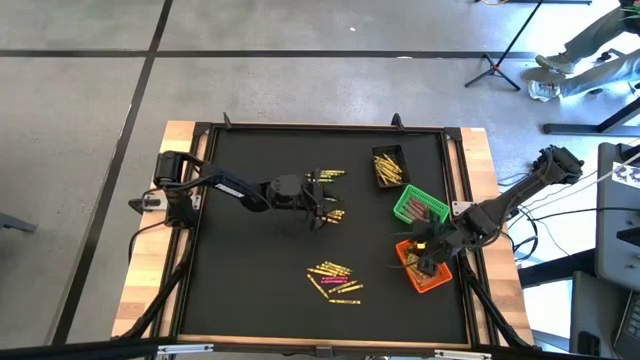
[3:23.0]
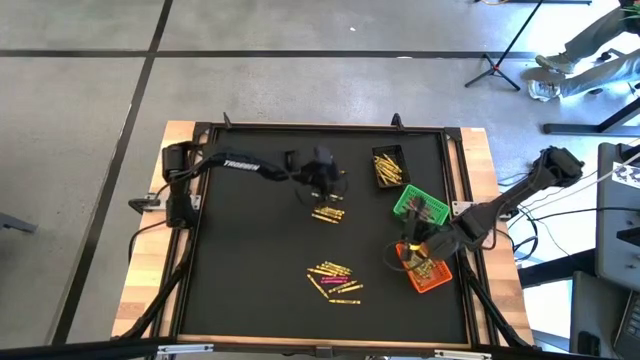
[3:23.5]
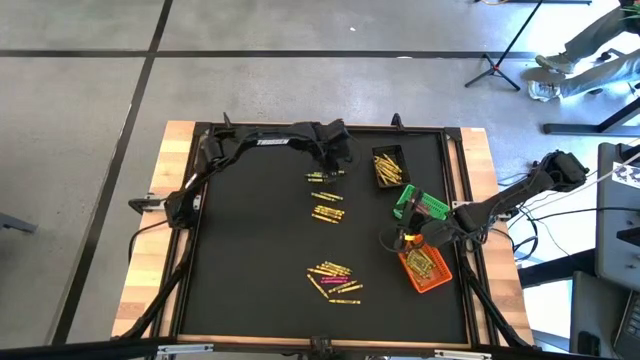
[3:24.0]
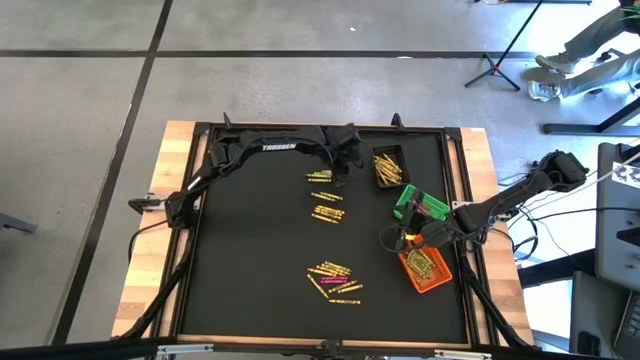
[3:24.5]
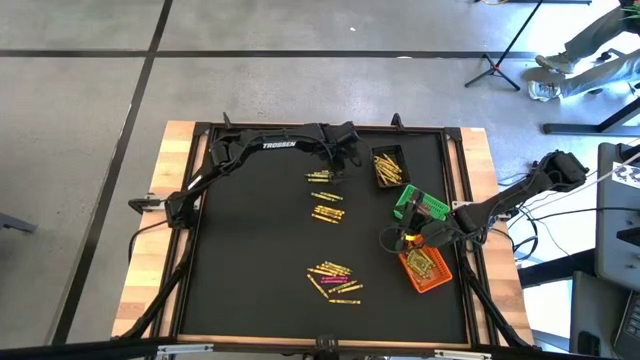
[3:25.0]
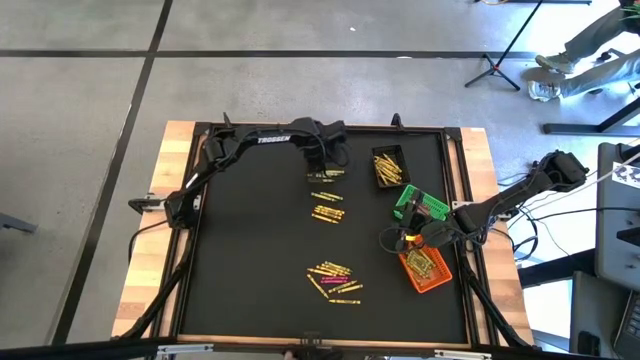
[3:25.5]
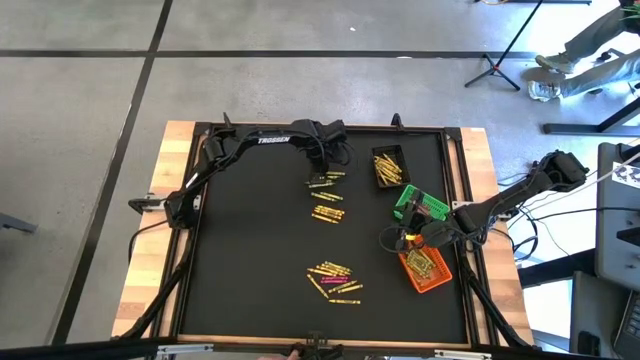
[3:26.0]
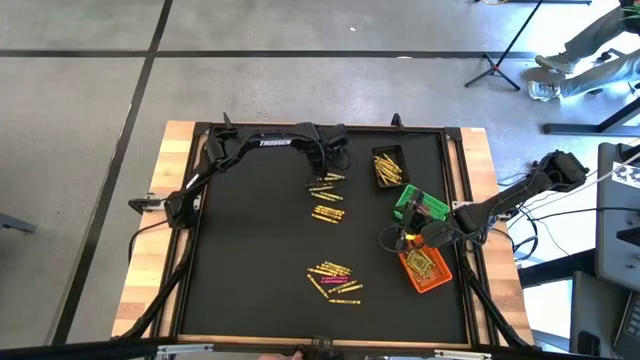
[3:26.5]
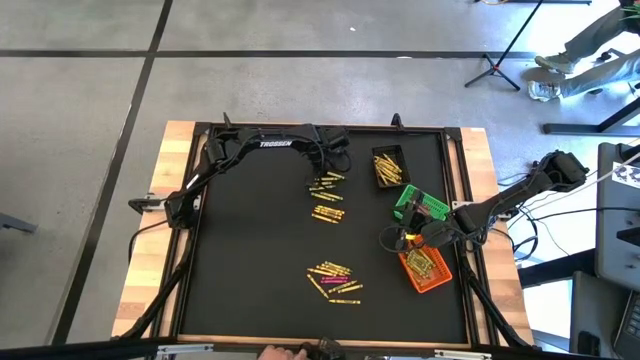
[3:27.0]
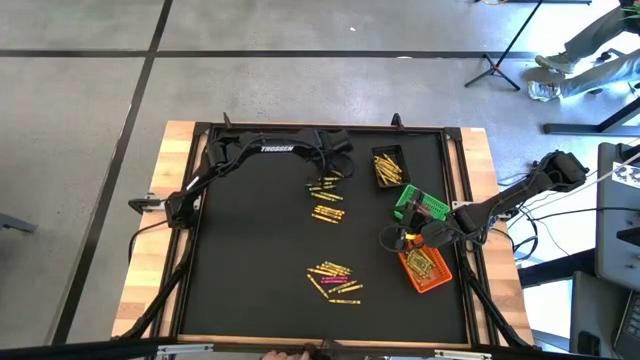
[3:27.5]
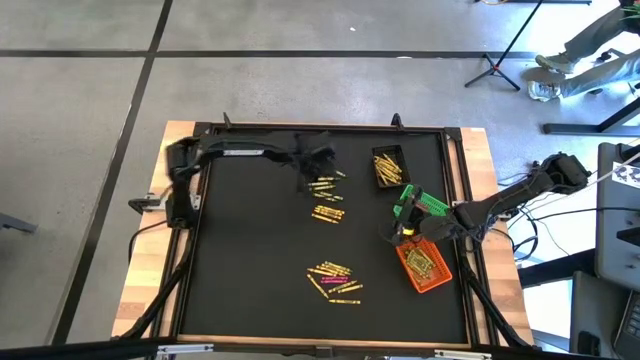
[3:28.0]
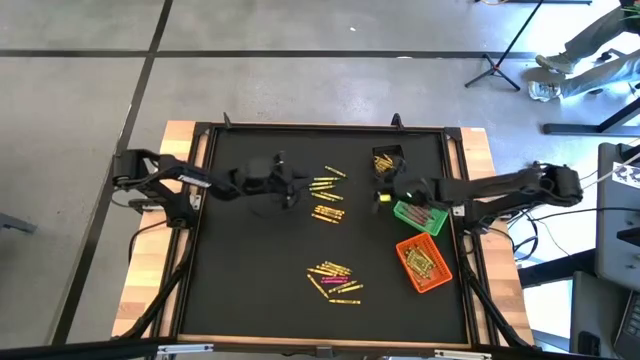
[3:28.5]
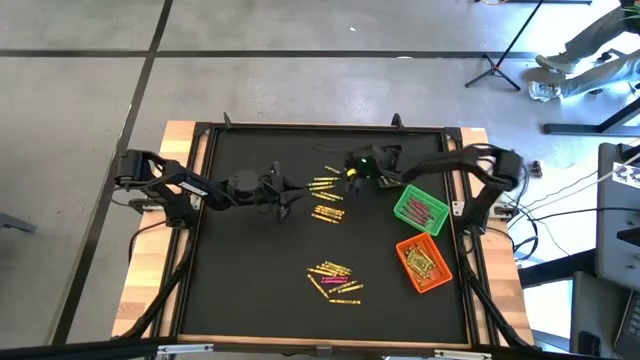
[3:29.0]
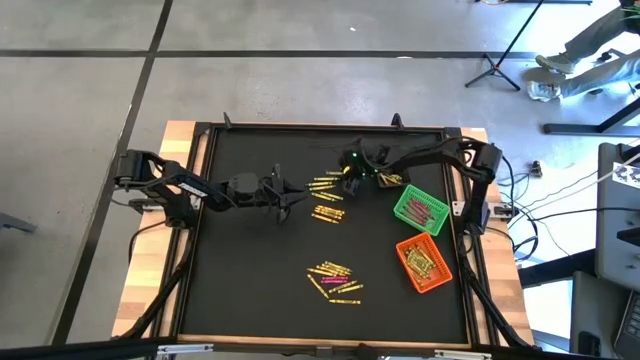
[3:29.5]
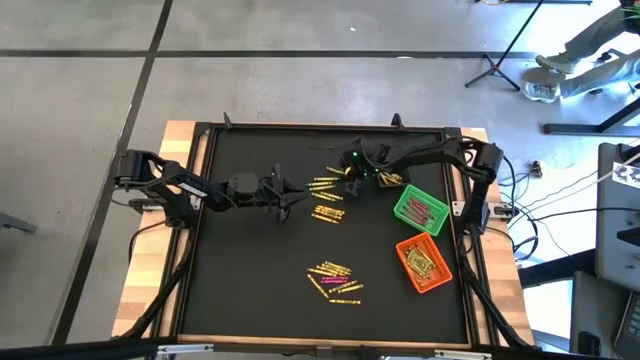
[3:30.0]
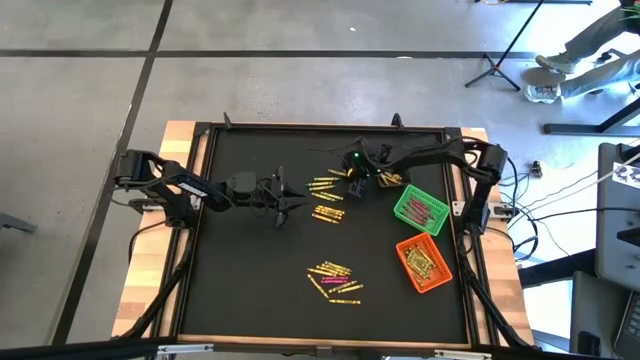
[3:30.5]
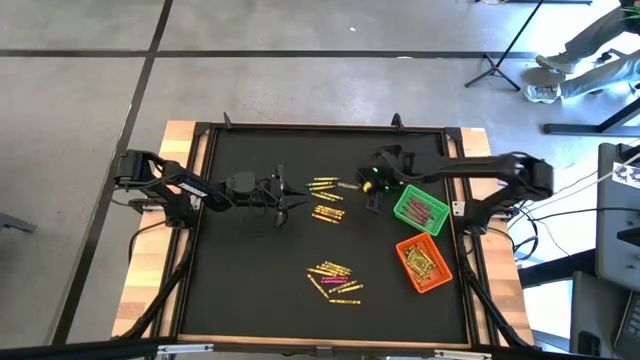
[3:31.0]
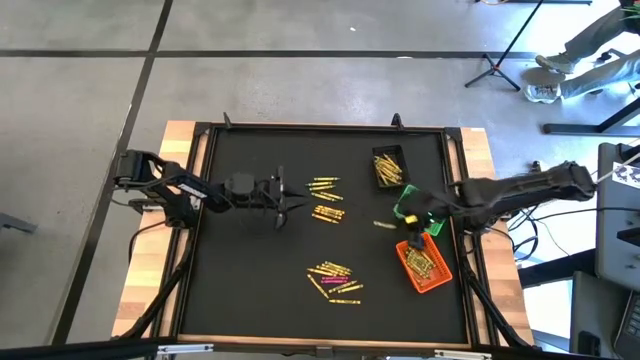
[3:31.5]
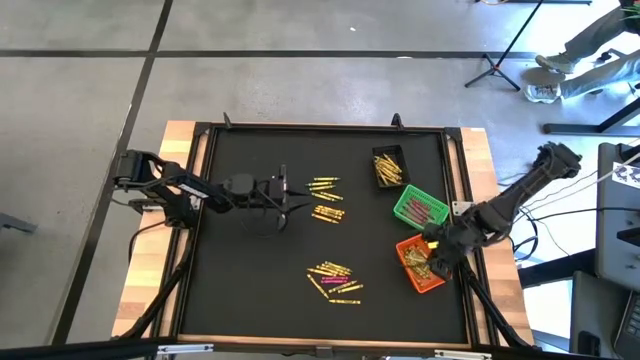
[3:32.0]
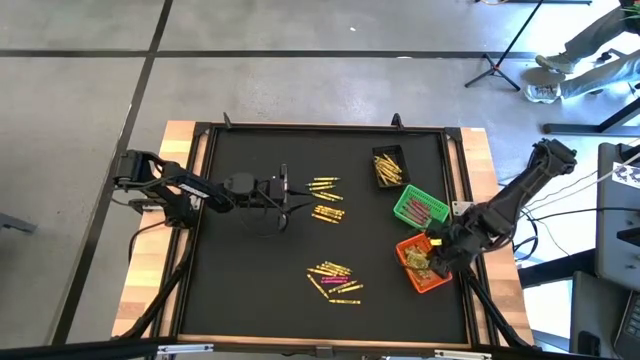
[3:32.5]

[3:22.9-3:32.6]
Task: Sort crayons
Put the green crayon into the orange basket

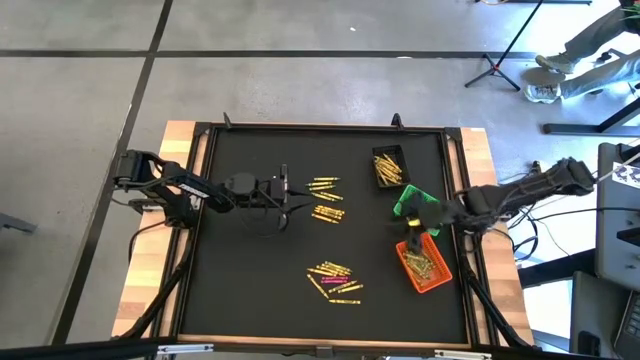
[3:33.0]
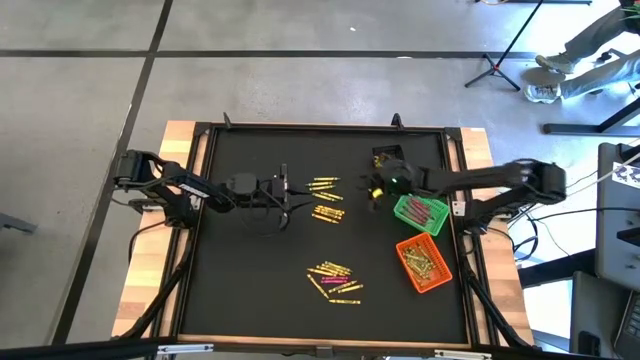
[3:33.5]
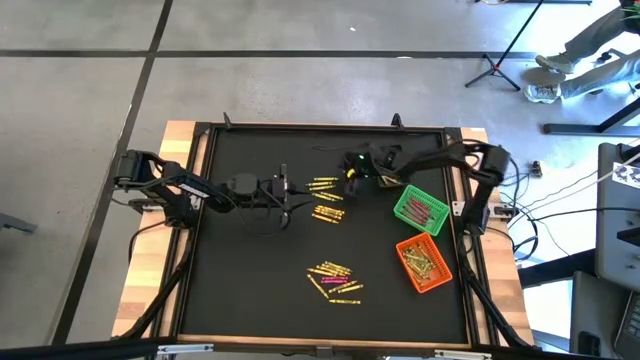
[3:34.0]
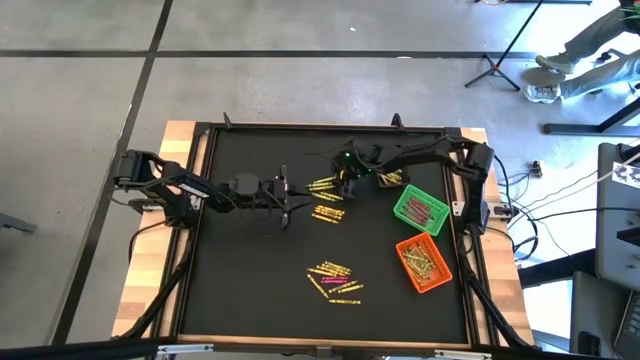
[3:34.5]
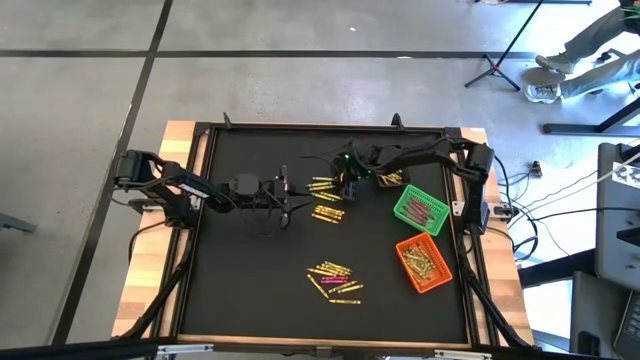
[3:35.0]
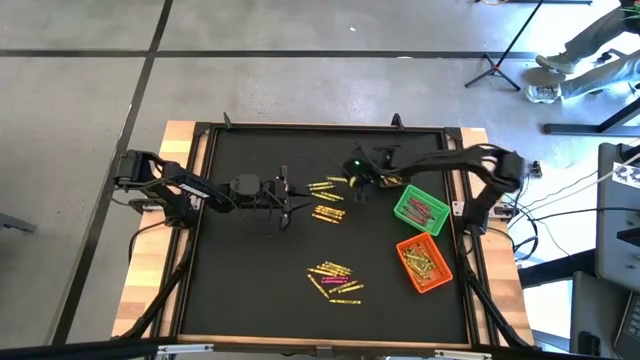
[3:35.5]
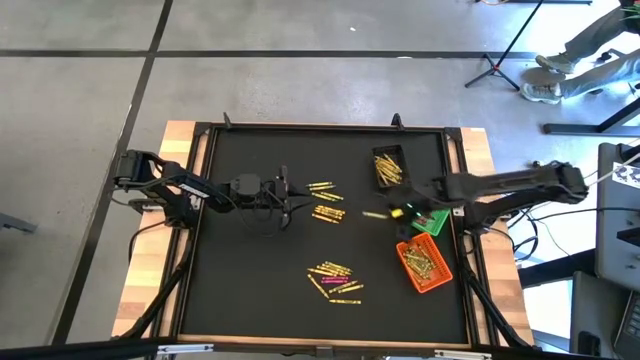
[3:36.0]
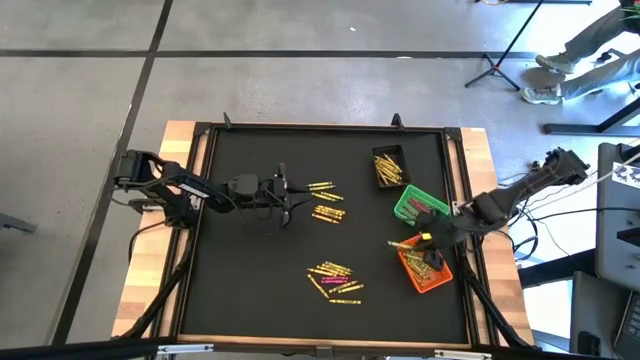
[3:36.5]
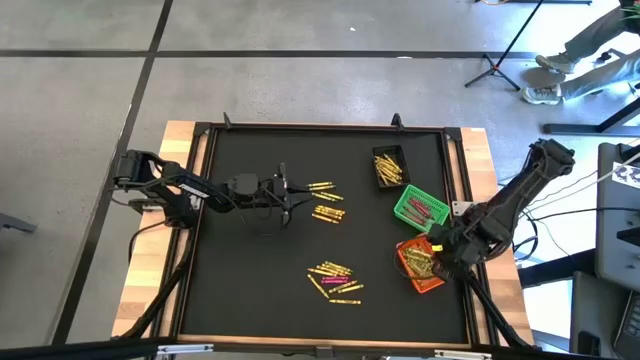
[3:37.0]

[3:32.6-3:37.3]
Put the green crayon into the orange basket

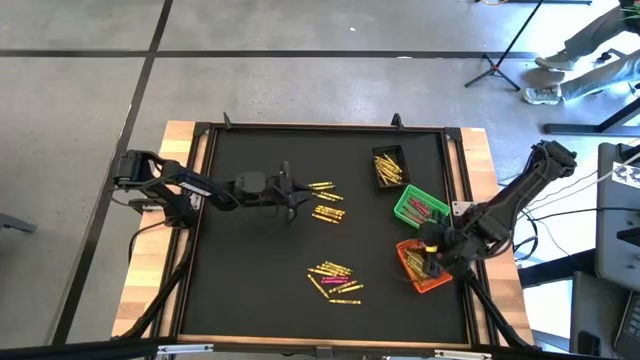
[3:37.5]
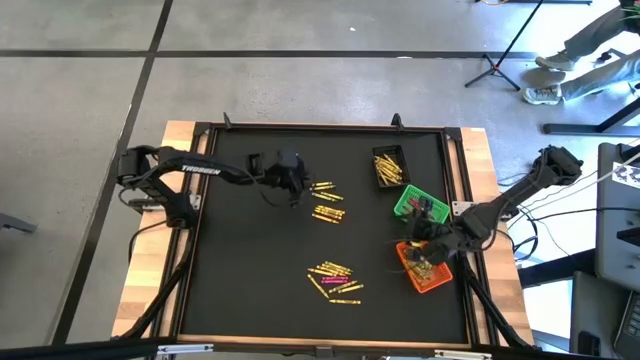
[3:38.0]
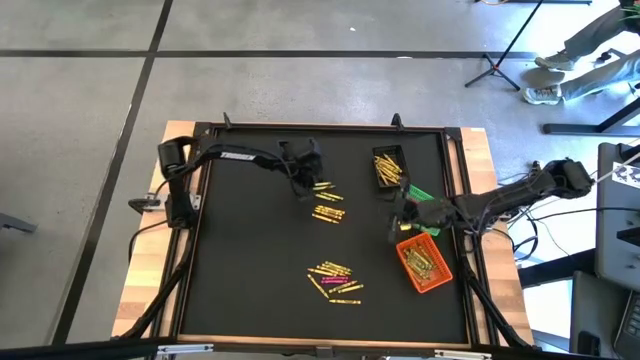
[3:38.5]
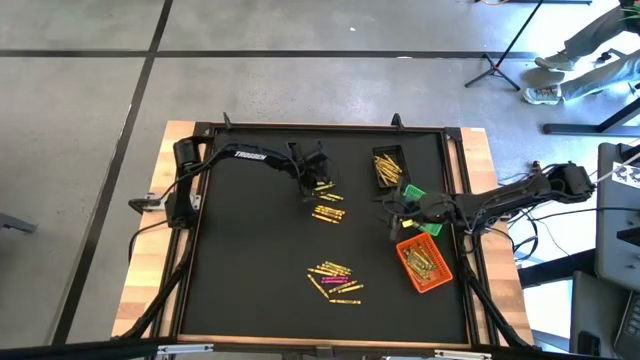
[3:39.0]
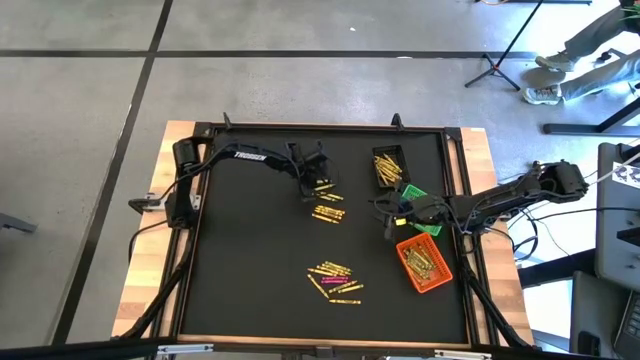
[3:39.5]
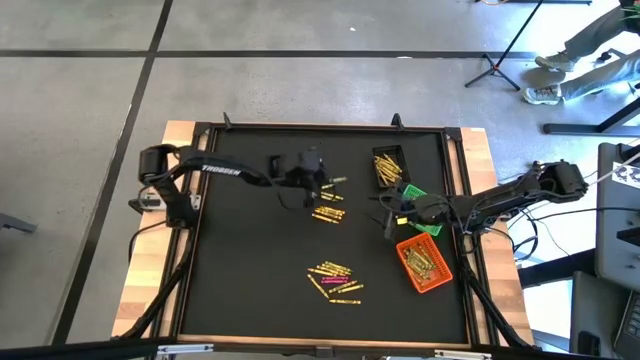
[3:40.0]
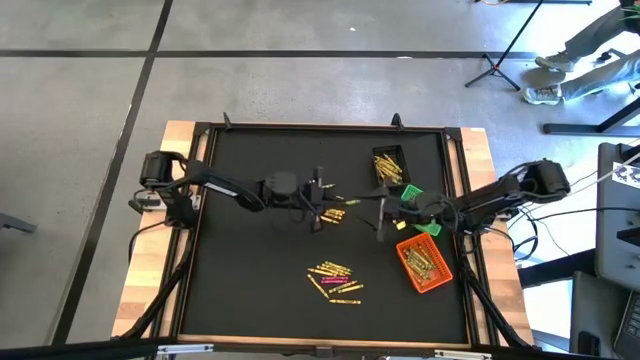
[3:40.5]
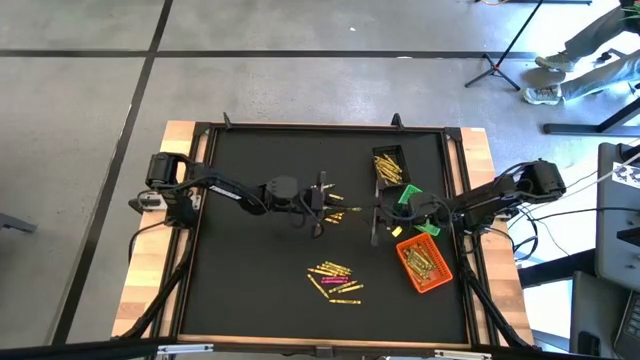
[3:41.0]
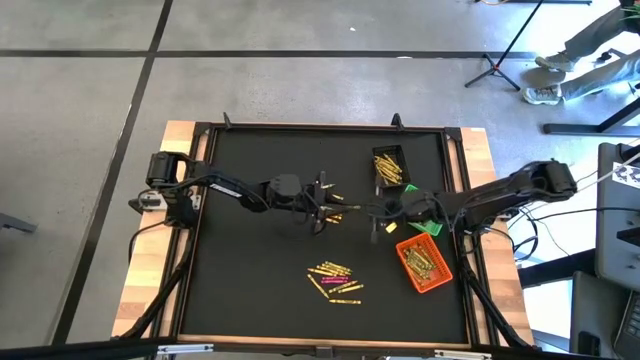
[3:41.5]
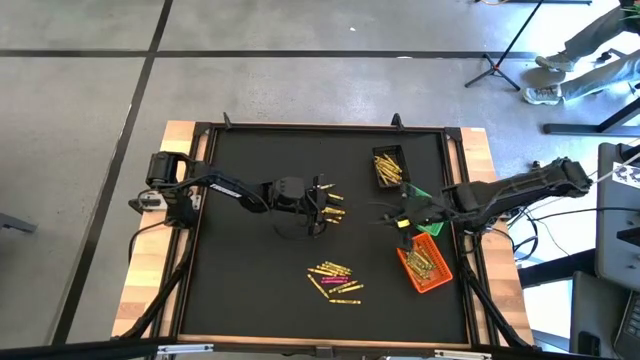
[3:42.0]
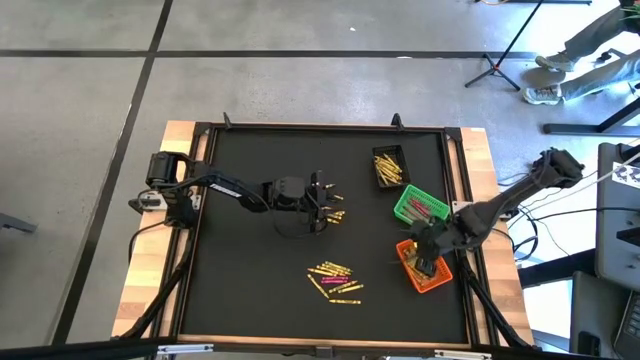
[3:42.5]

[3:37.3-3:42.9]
Put the green crayon into the orange basket

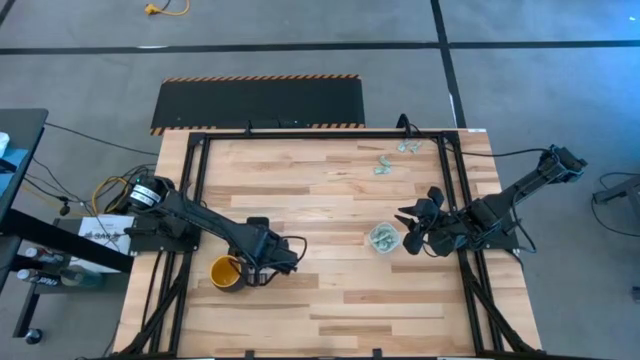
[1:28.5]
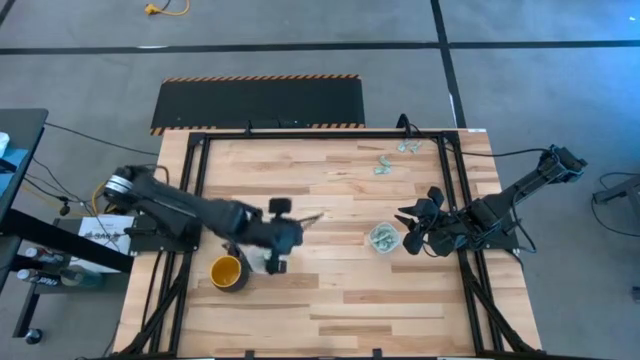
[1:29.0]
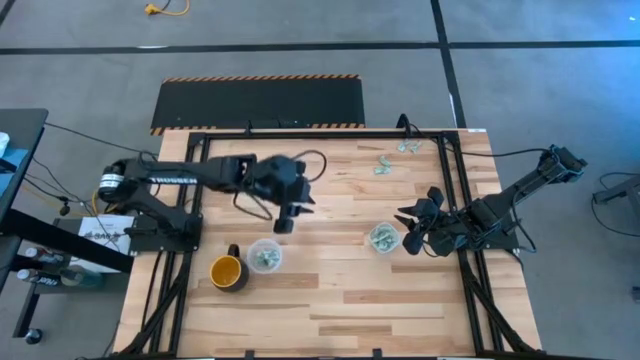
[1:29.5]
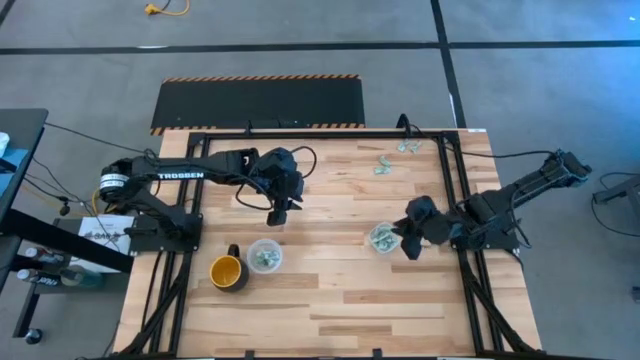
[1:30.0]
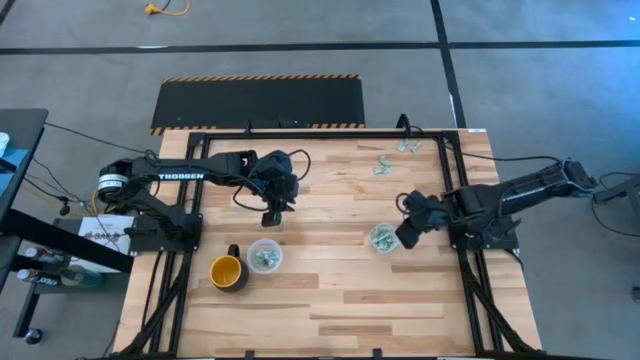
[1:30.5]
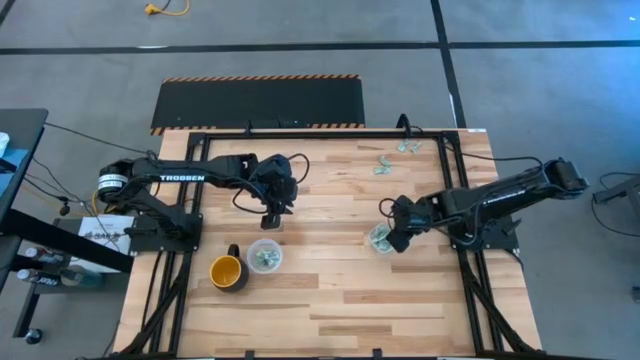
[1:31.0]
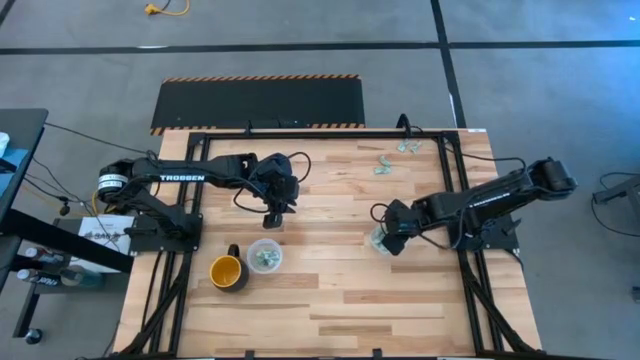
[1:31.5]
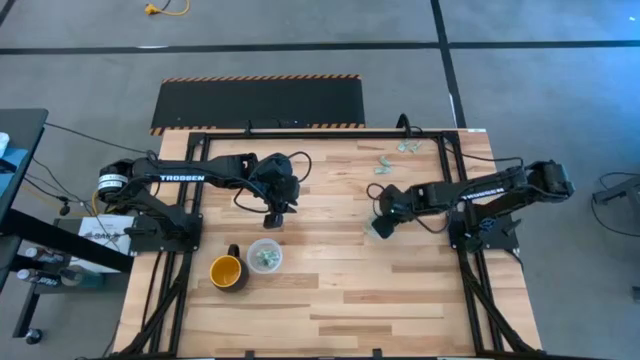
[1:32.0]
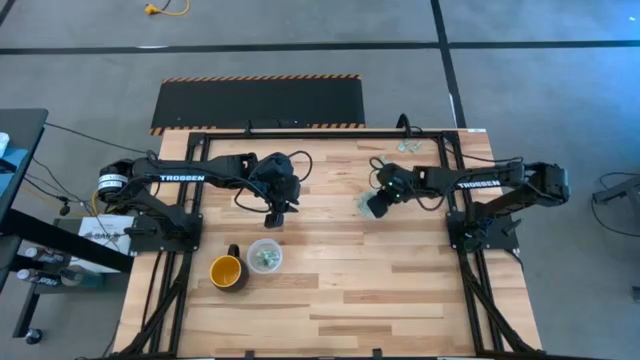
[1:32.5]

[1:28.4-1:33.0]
Task: Pick and place Stevia / Truvia into bins
Move the square transparent container to the top right of the table
